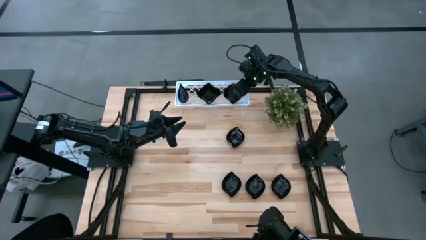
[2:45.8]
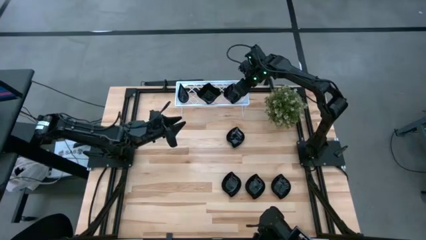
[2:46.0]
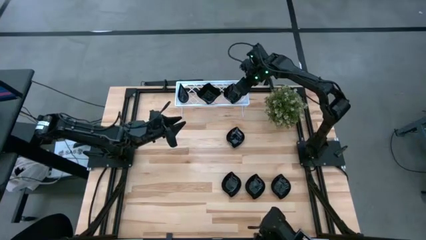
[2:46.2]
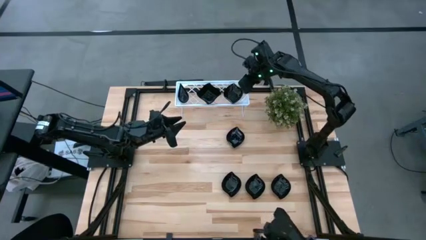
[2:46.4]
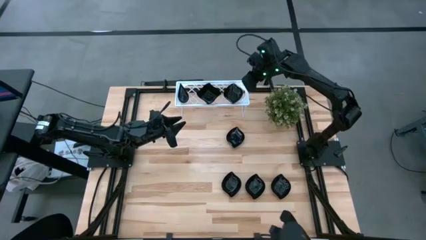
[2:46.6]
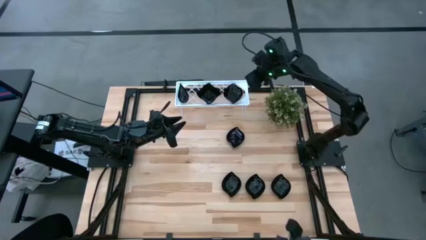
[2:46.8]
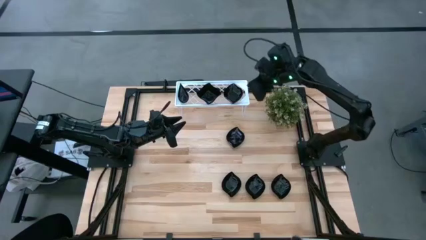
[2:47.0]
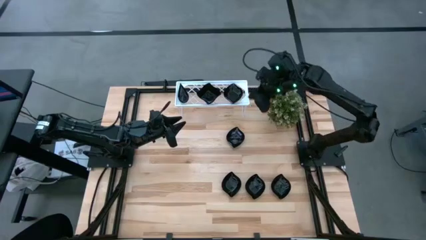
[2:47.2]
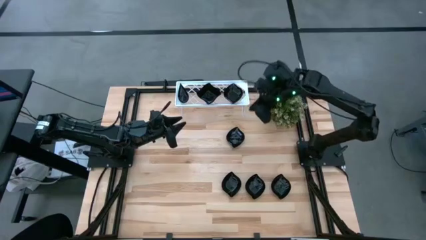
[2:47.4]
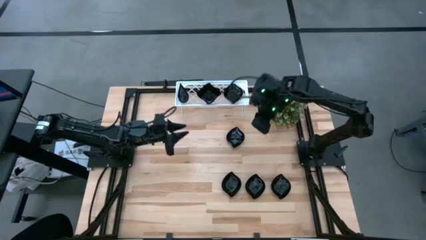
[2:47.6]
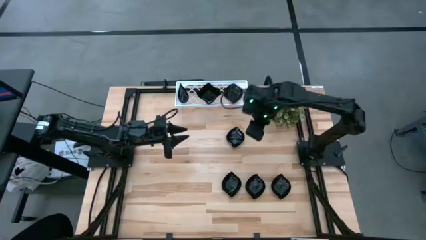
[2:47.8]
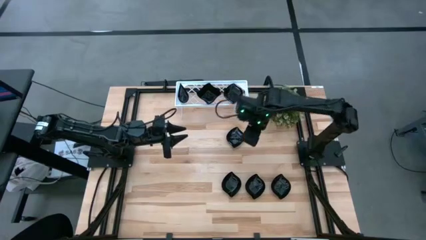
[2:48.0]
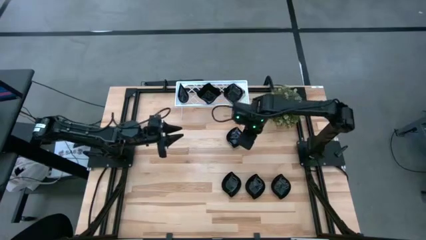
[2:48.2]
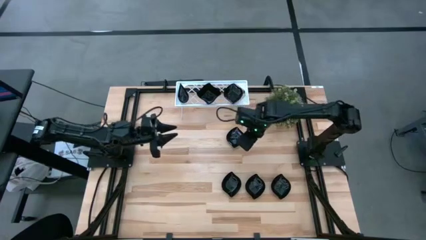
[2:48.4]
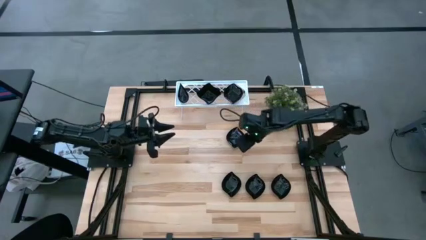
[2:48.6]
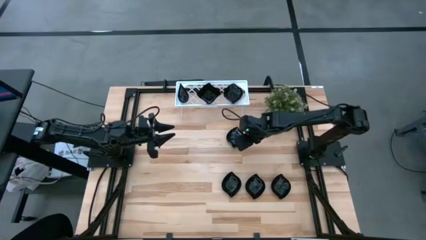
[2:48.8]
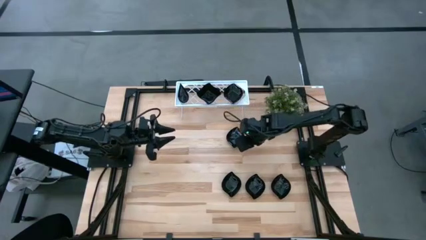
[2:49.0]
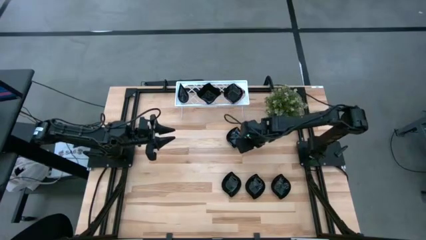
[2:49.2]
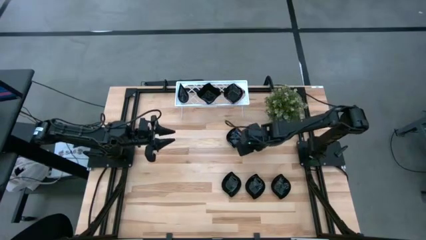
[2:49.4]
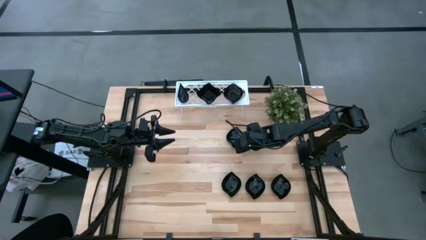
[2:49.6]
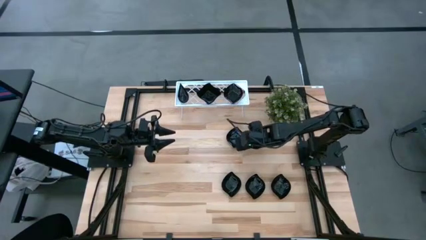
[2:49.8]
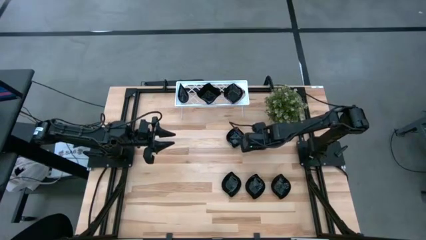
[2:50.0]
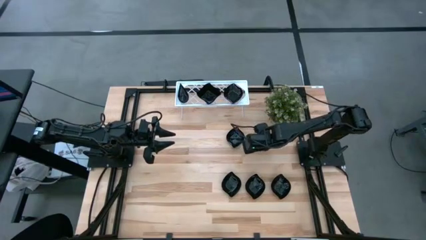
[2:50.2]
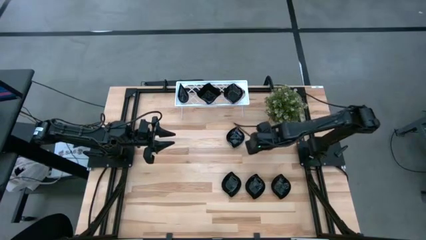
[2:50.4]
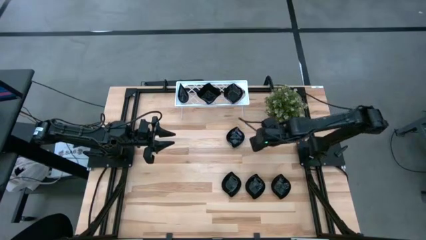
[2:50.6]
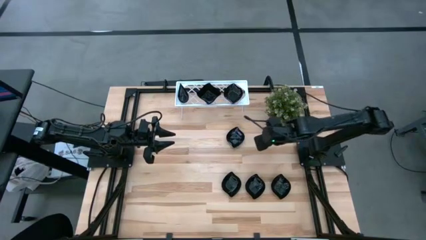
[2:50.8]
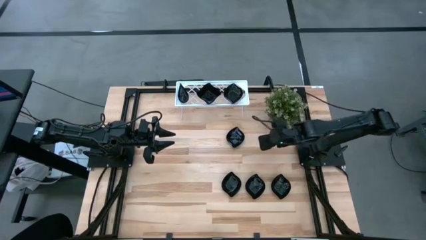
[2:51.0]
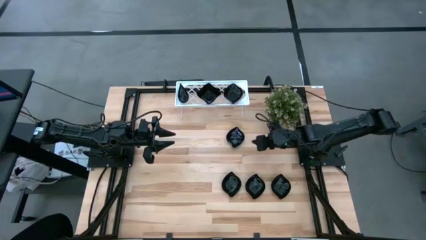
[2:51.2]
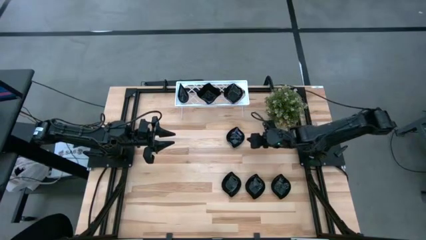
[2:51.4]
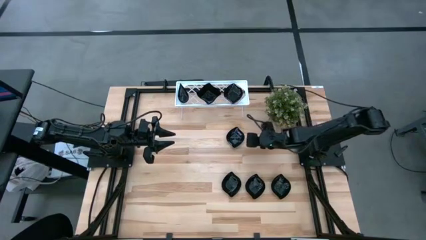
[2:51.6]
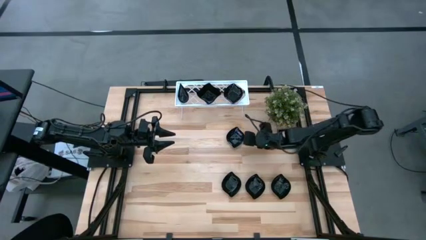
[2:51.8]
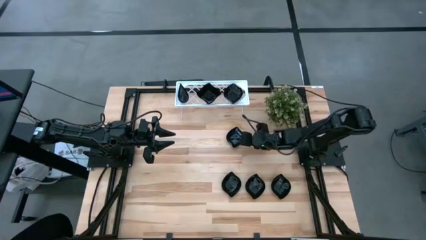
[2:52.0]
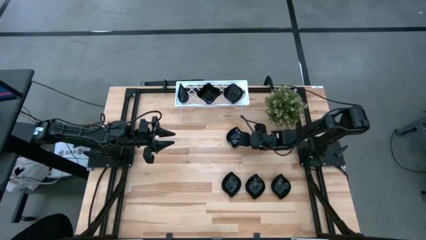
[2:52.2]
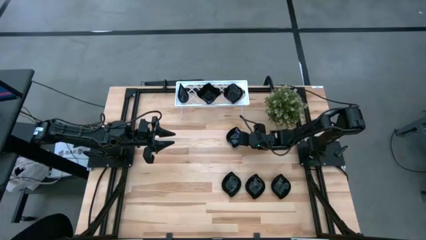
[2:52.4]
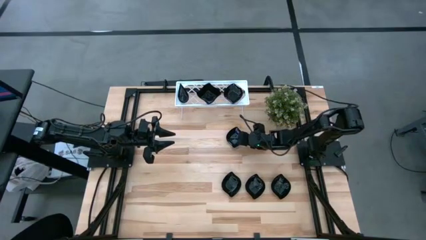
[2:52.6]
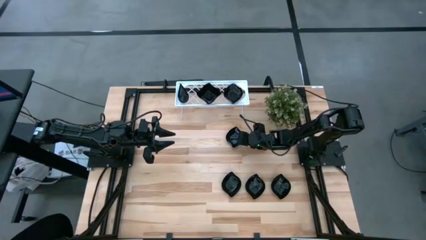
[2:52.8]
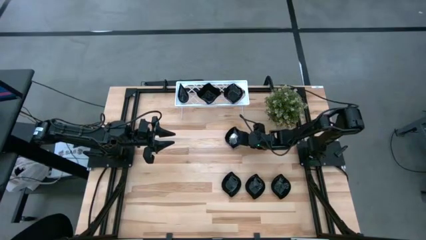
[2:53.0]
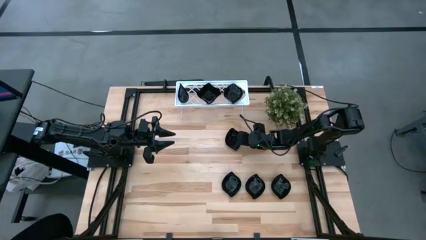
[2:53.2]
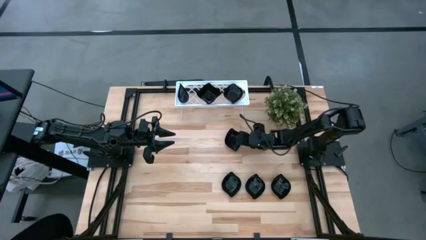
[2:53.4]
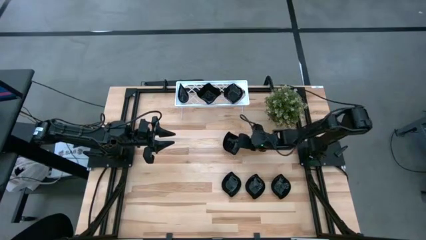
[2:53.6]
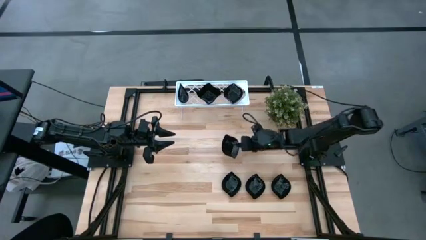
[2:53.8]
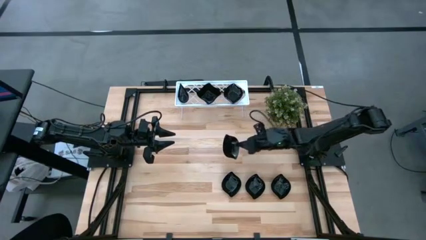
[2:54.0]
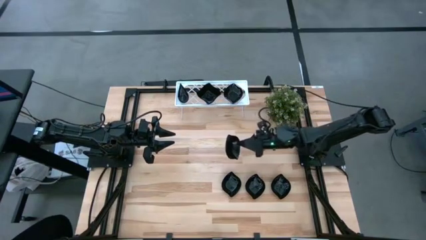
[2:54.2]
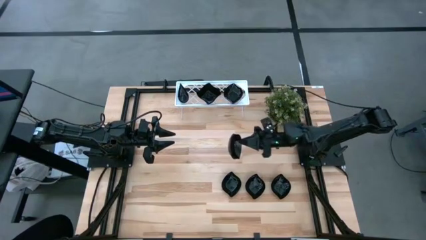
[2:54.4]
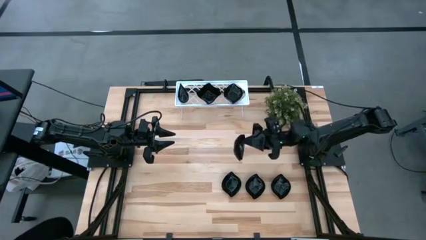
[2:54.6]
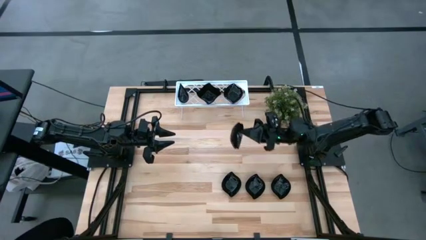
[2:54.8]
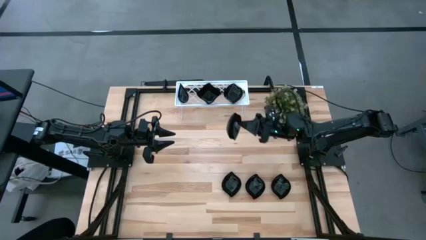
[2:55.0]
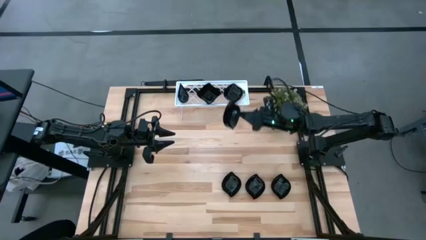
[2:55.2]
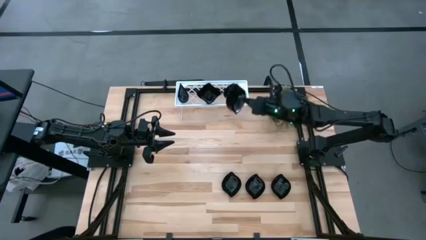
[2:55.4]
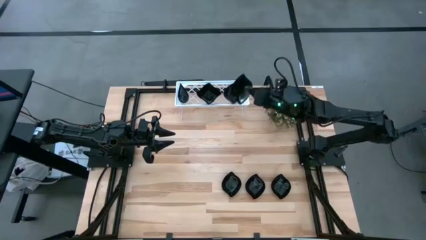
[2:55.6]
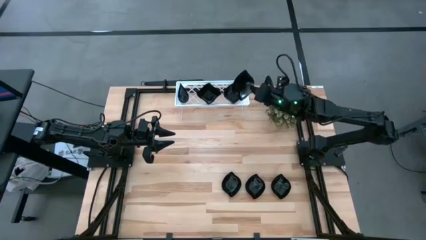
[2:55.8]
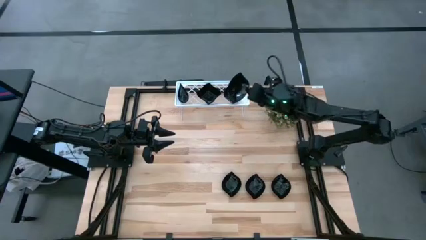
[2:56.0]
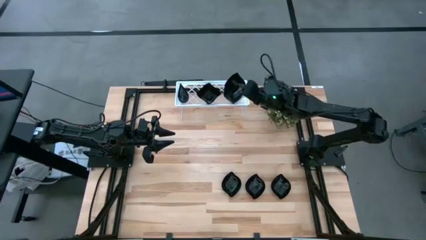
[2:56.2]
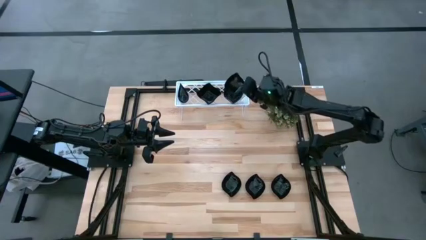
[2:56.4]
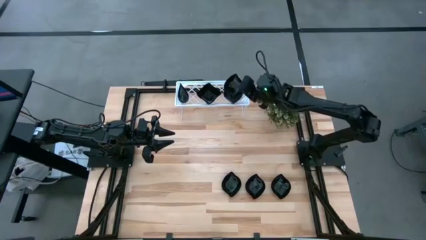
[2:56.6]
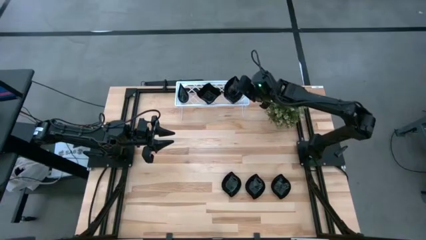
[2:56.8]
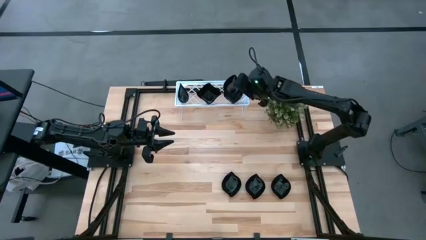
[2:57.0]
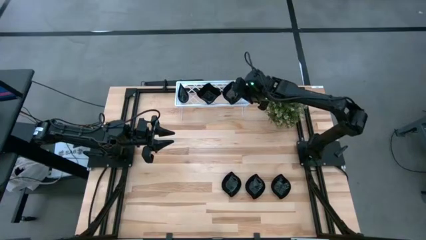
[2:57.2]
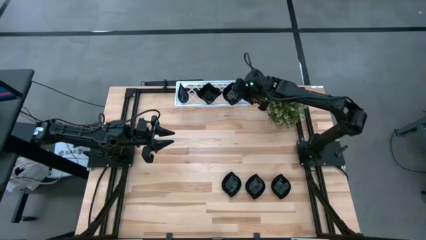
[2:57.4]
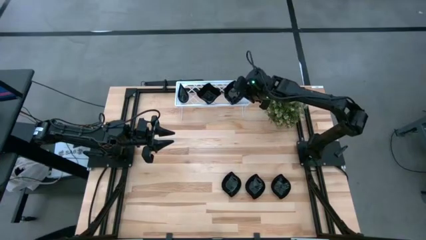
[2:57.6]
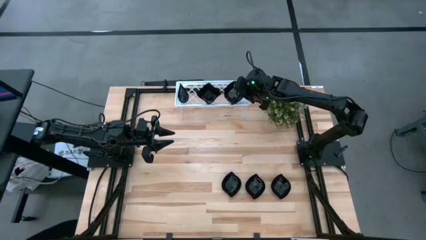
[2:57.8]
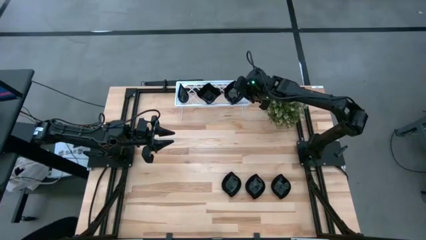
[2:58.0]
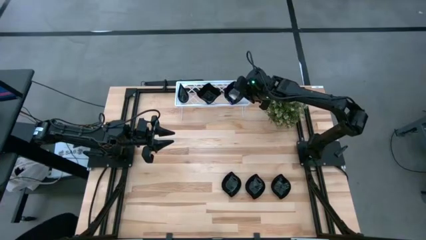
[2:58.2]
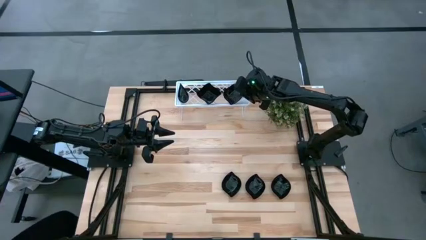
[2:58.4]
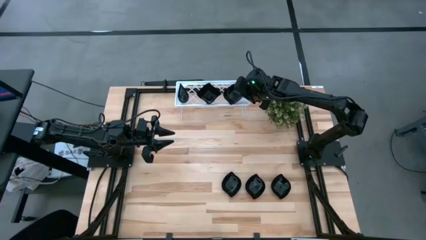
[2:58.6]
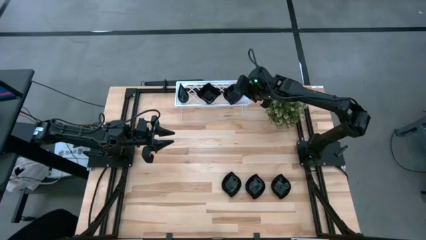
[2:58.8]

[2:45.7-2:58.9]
Task: Pick & Place Mini shaped plates
Stack the leaf-shaped plate on top of the leaf-shaped plate on the shelf

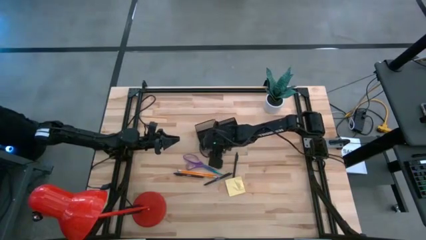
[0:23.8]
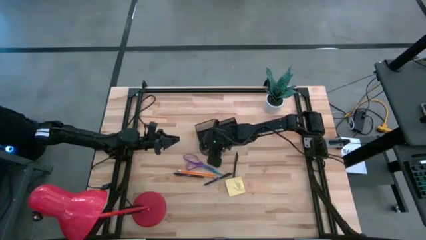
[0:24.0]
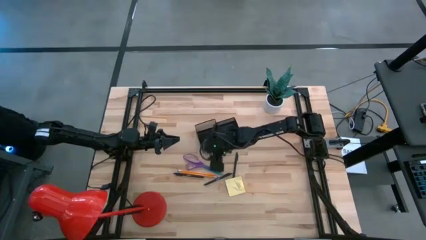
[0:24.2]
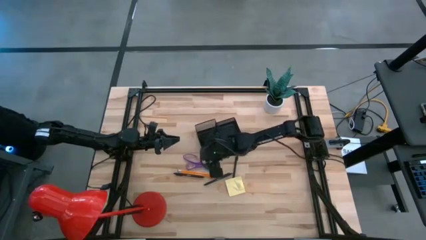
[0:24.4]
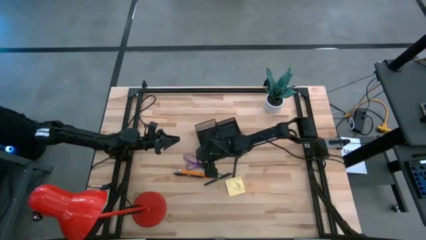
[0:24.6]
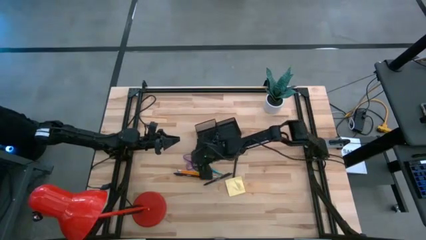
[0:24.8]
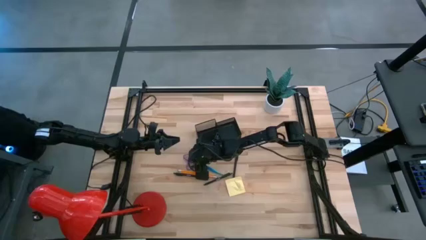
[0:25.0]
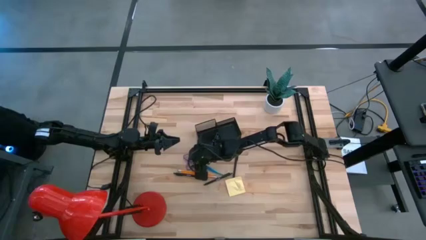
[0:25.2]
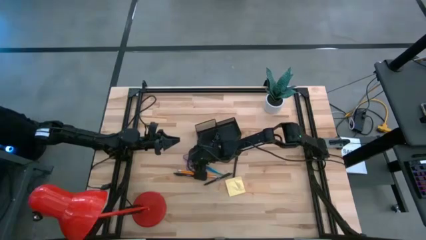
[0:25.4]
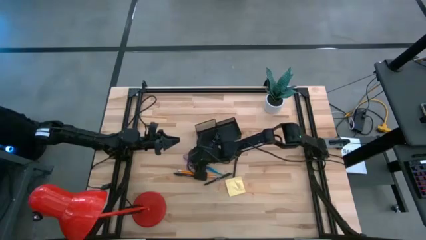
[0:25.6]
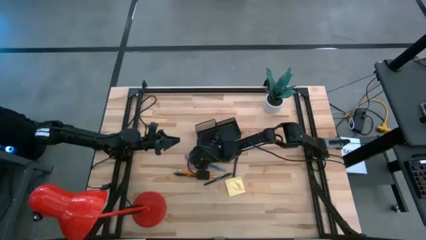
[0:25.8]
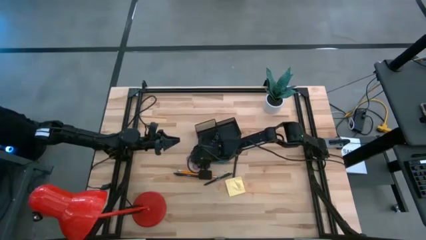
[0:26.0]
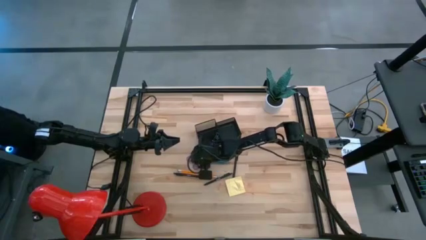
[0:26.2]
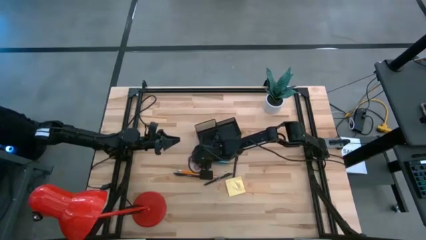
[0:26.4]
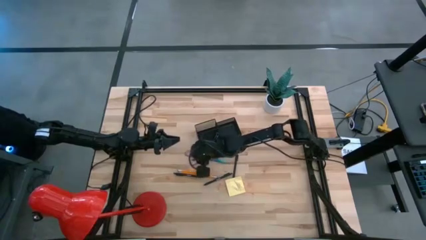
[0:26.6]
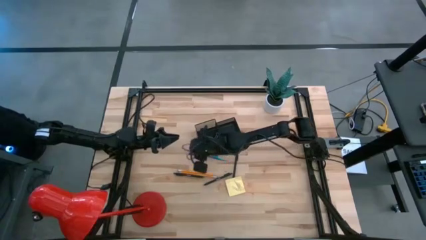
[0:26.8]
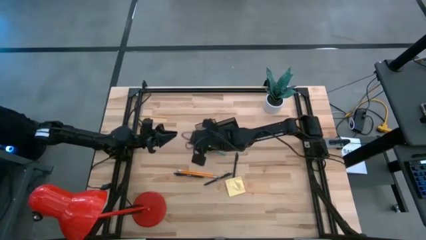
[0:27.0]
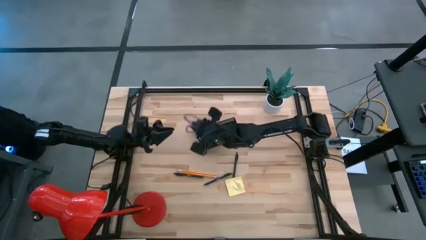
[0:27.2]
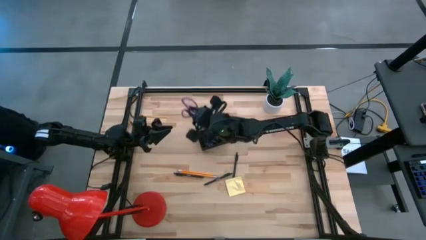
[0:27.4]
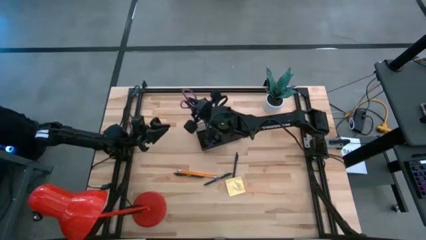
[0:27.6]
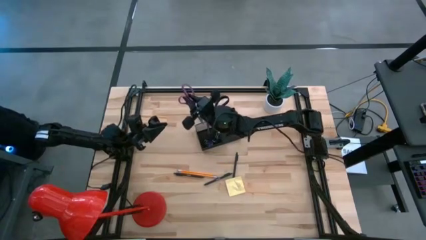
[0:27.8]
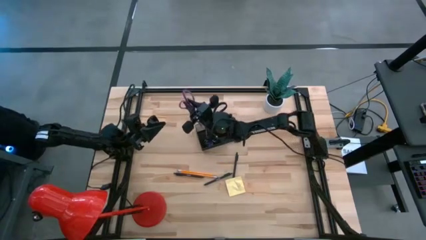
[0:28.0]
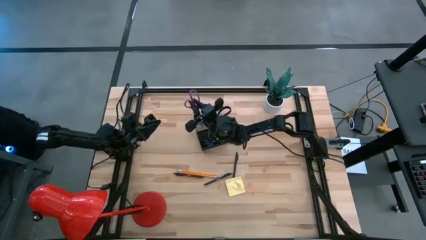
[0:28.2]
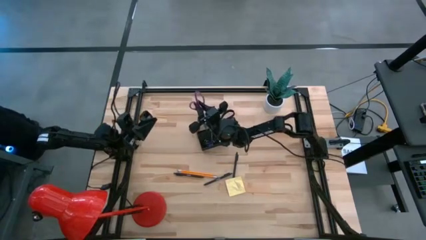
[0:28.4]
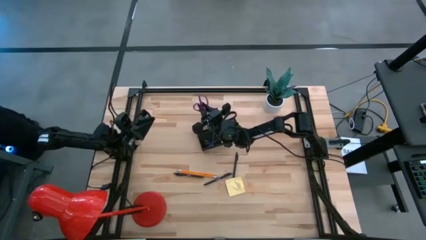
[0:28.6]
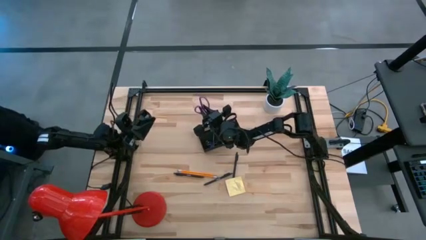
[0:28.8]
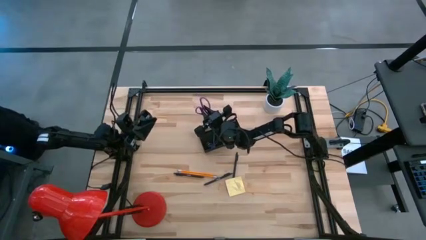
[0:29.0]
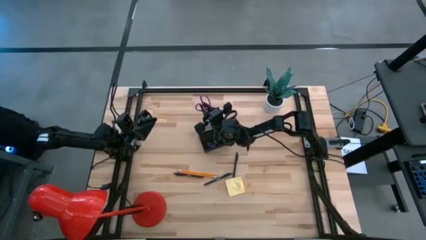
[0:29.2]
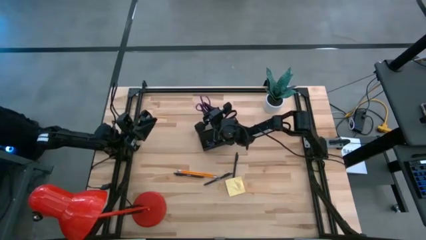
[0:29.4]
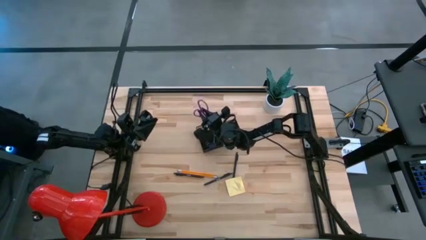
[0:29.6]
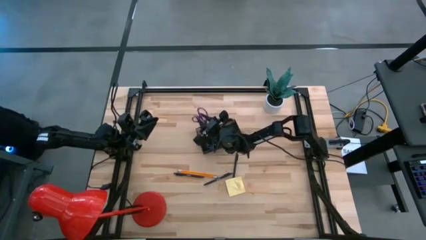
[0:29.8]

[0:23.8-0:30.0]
Task: Pick and place office supplies into organizer
Put the purple scissors into the black desk organizer
